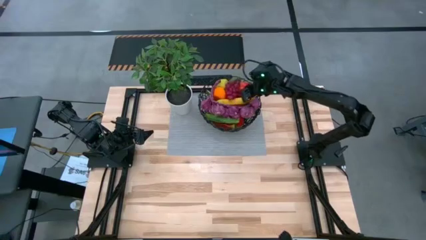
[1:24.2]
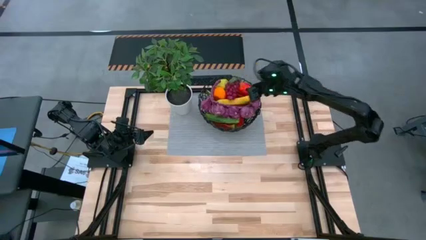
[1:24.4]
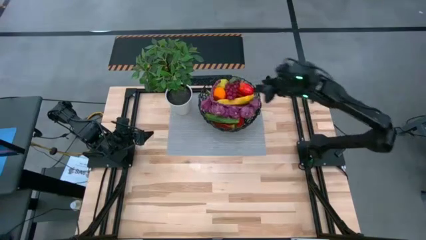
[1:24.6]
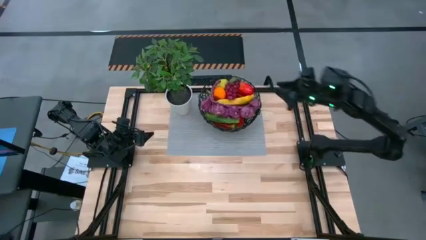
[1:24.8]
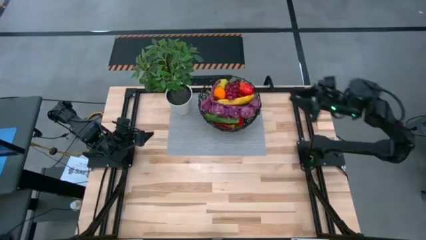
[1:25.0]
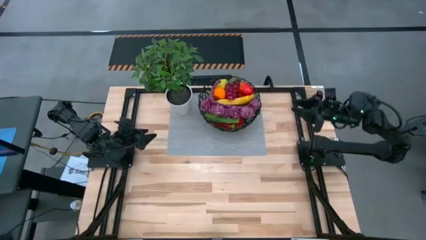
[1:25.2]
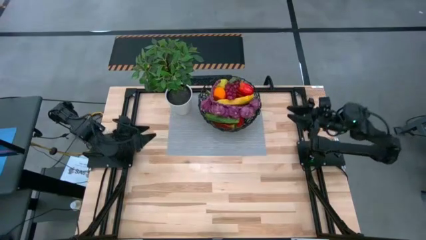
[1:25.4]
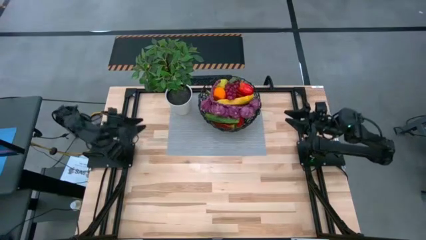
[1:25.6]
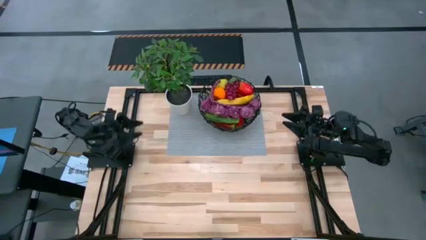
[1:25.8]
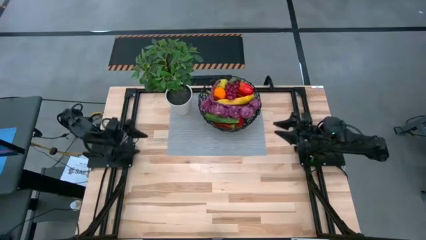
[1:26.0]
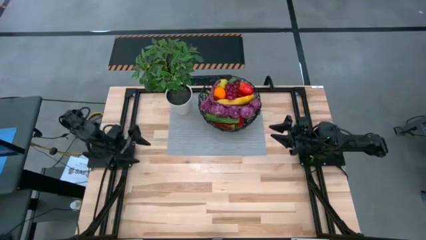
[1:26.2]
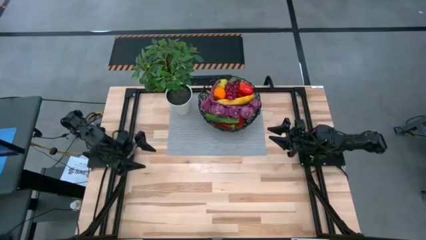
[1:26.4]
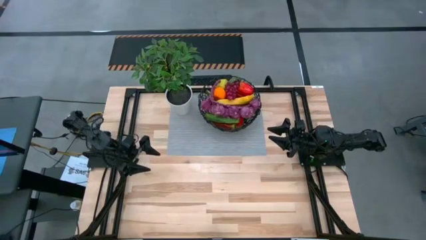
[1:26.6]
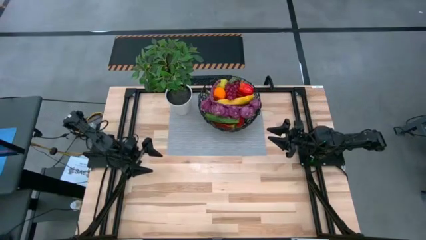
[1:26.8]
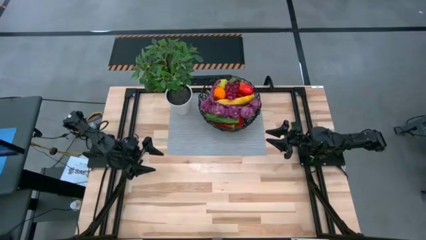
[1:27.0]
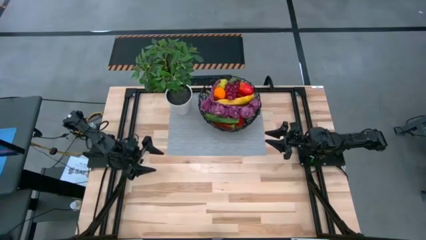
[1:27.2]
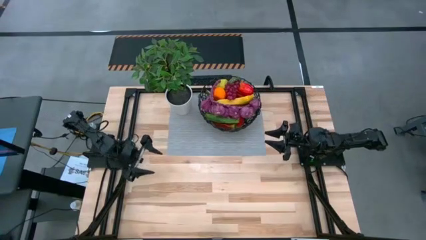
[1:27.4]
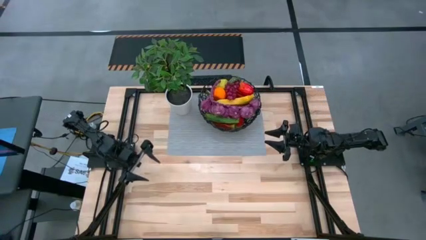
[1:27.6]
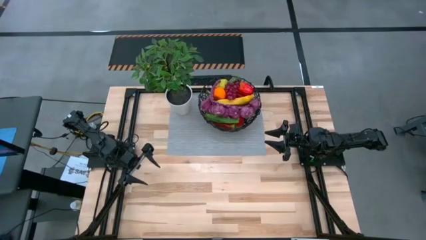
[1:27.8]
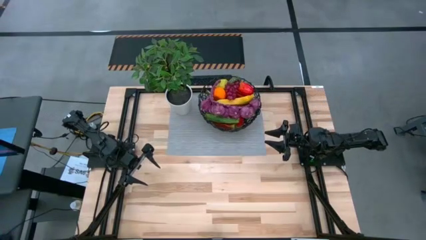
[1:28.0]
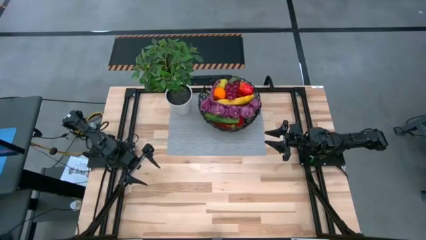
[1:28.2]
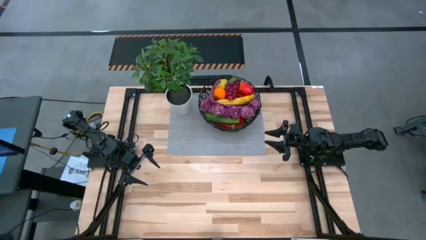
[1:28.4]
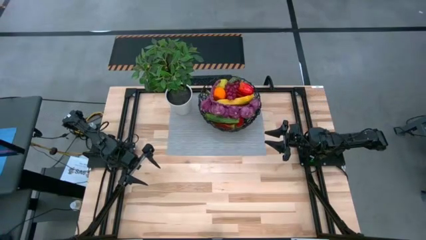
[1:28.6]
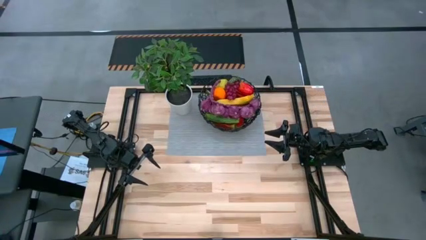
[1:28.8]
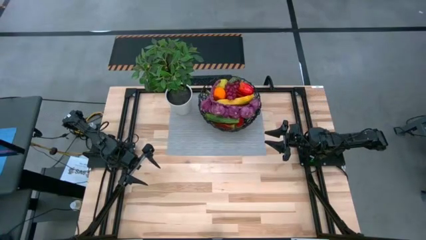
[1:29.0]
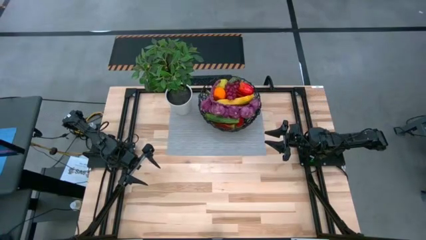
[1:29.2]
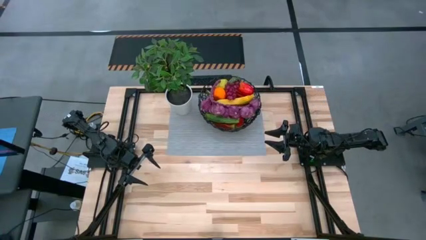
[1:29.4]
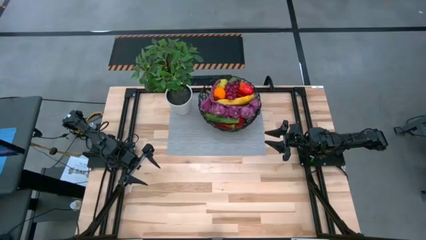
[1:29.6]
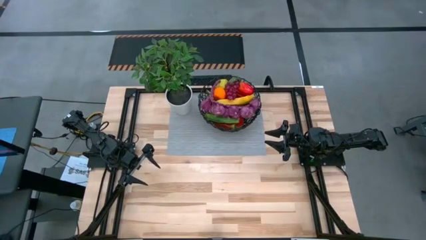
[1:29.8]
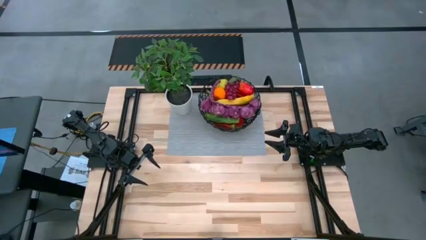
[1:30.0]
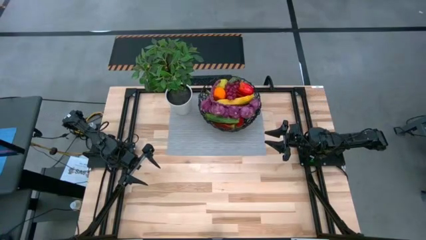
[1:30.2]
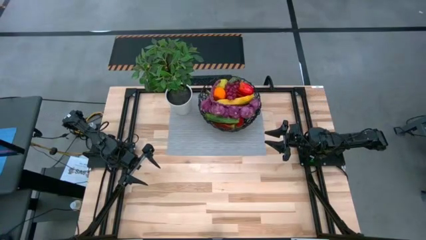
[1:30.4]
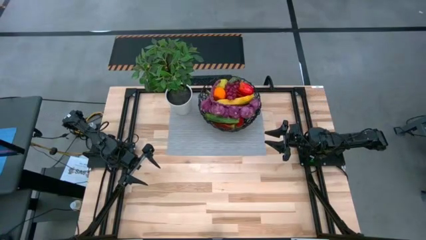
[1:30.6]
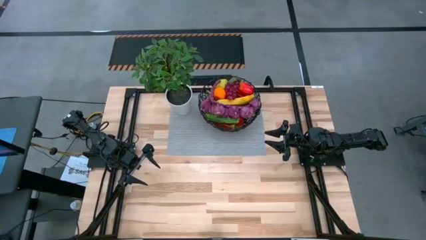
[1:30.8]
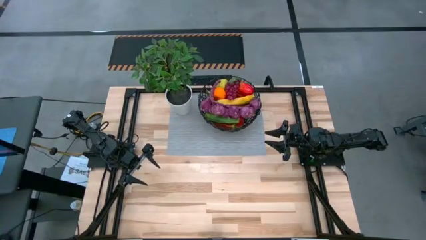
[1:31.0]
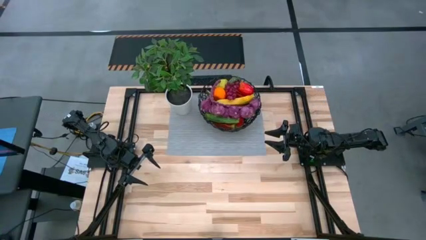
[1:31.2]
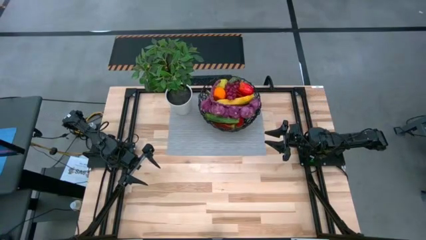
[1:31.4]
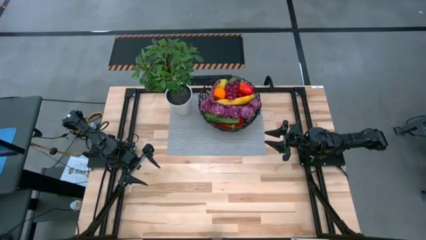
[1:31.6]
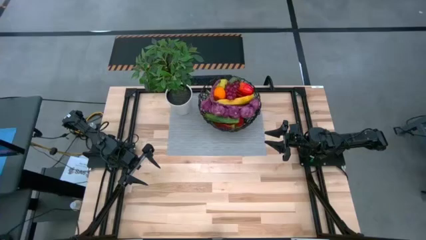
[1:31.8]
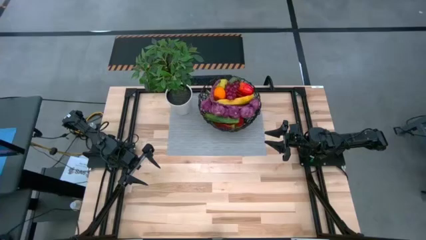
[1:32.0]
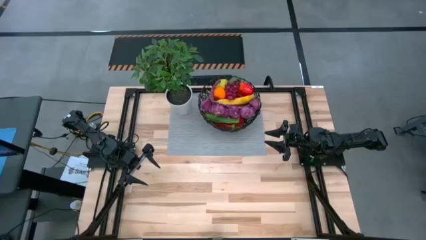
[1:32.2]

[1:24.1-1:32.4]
Task: Build produce basket
Return to Home Position

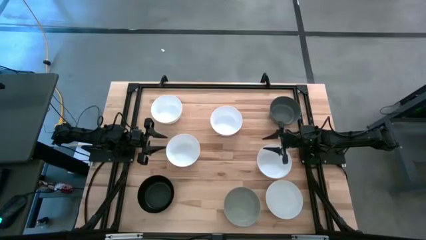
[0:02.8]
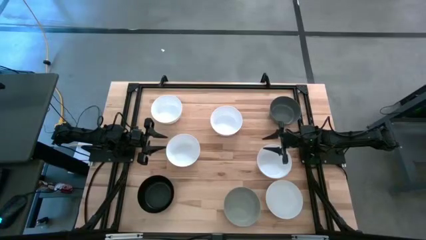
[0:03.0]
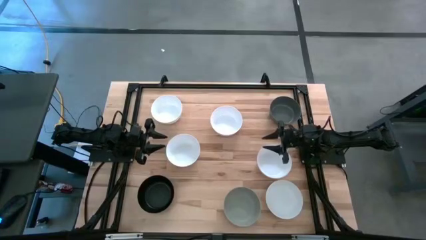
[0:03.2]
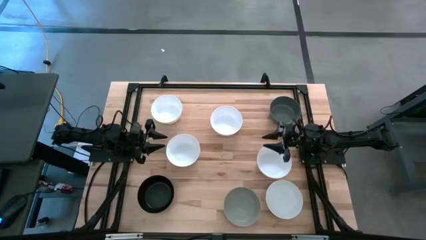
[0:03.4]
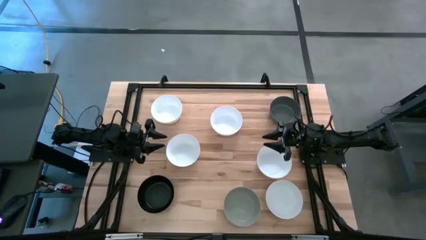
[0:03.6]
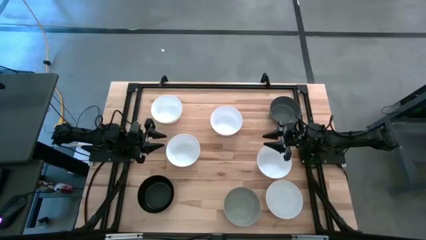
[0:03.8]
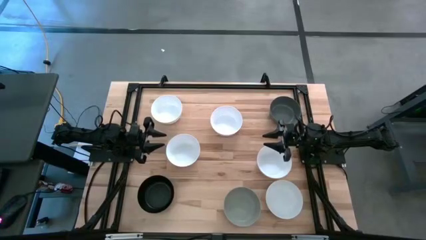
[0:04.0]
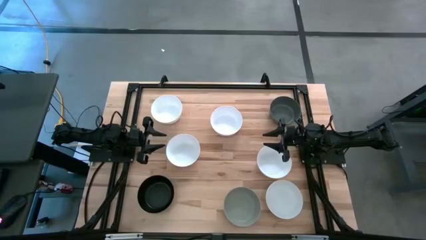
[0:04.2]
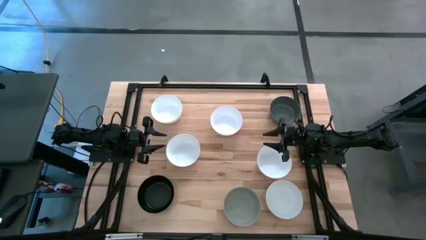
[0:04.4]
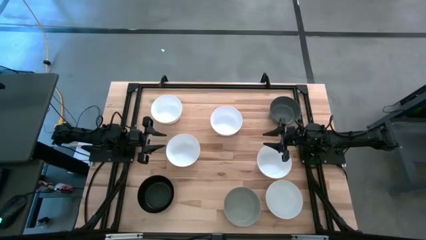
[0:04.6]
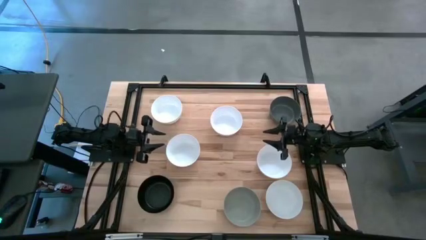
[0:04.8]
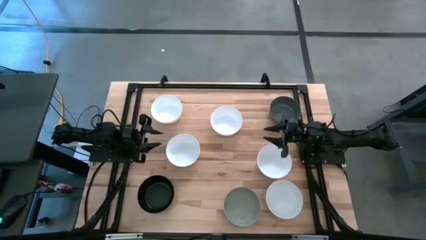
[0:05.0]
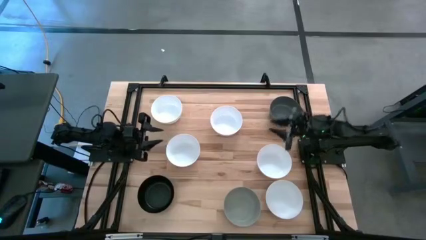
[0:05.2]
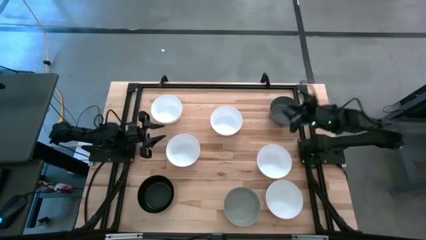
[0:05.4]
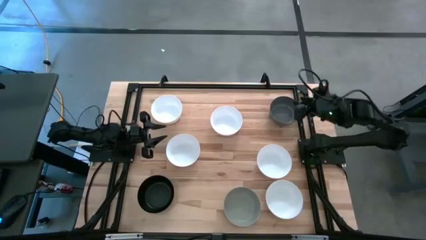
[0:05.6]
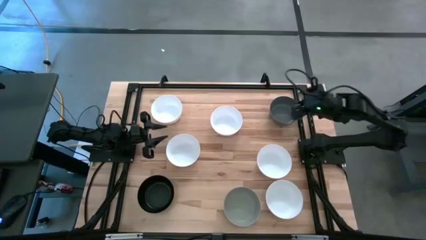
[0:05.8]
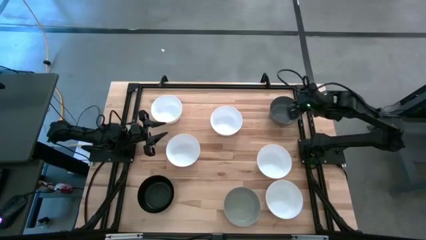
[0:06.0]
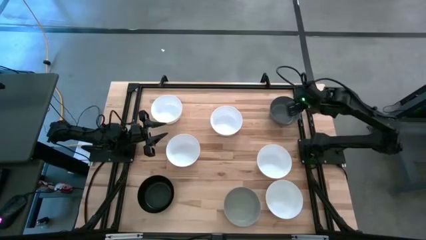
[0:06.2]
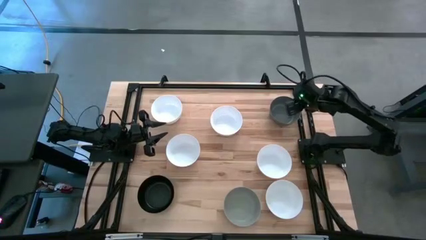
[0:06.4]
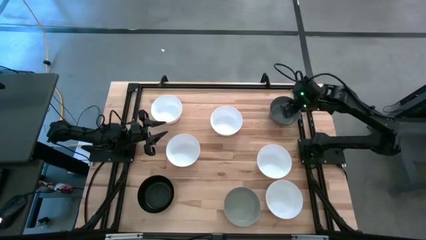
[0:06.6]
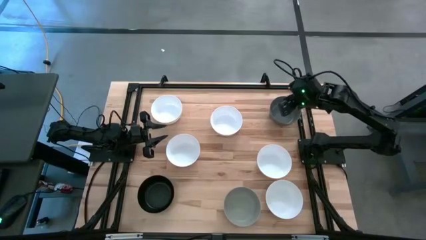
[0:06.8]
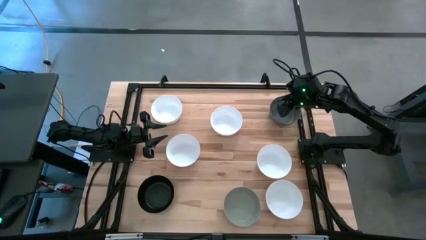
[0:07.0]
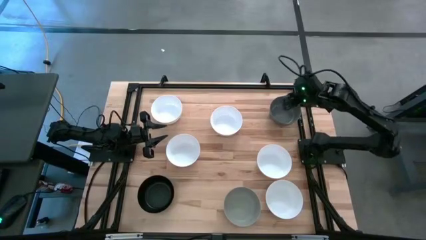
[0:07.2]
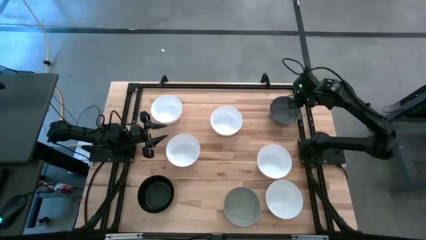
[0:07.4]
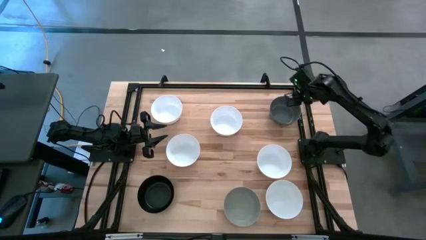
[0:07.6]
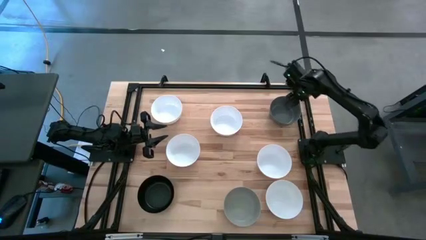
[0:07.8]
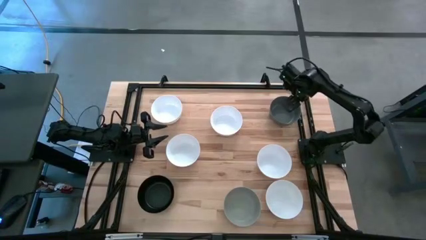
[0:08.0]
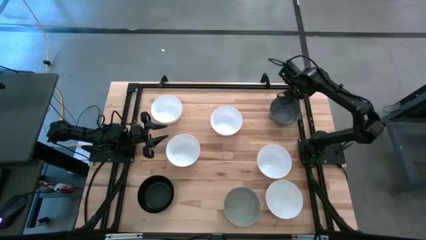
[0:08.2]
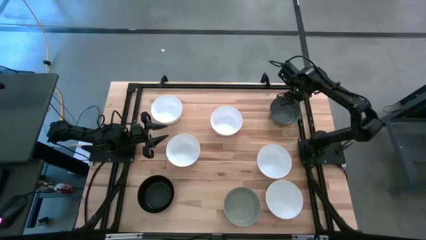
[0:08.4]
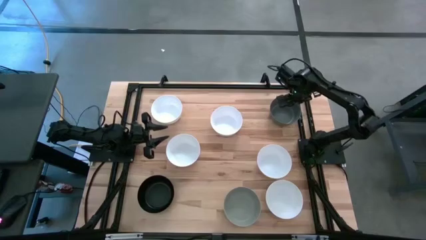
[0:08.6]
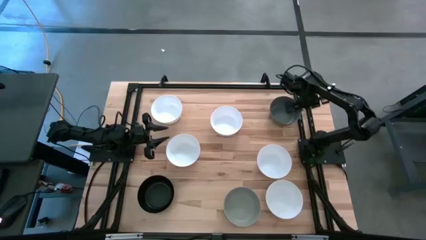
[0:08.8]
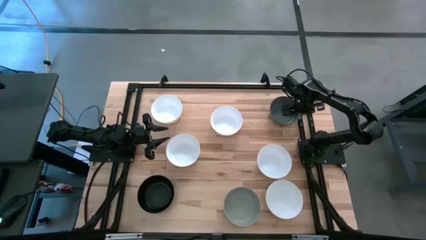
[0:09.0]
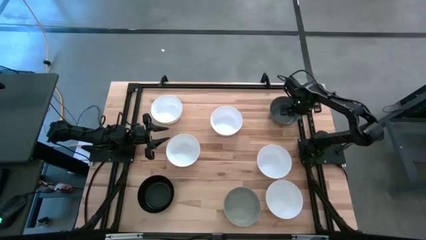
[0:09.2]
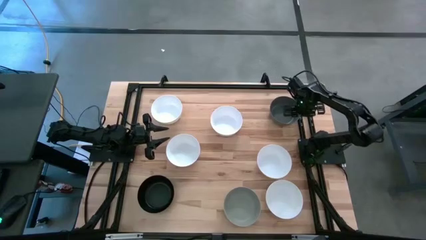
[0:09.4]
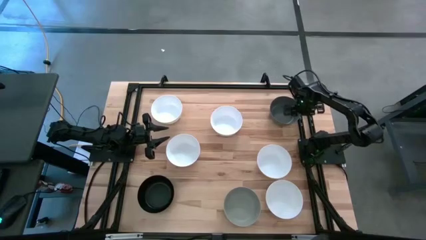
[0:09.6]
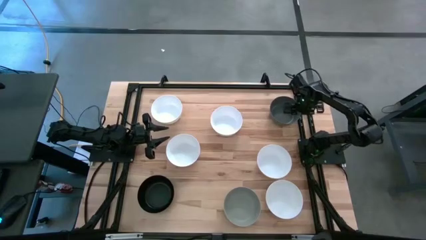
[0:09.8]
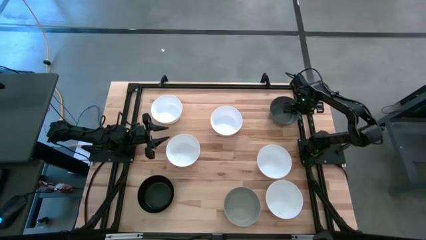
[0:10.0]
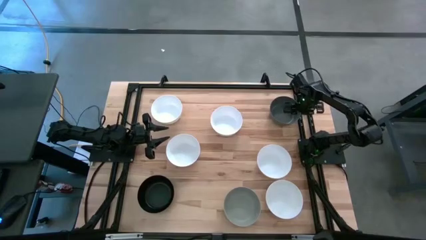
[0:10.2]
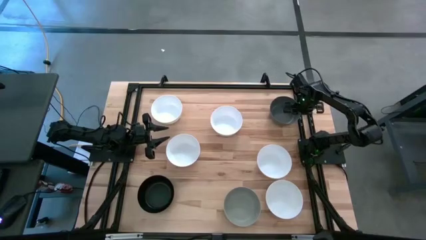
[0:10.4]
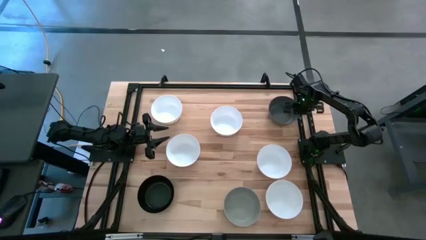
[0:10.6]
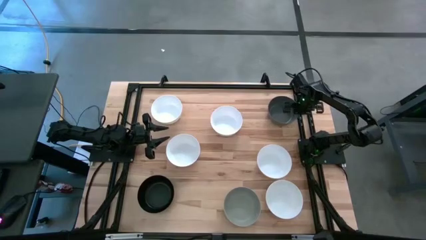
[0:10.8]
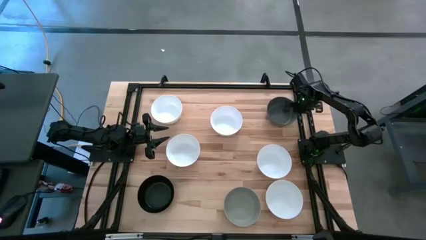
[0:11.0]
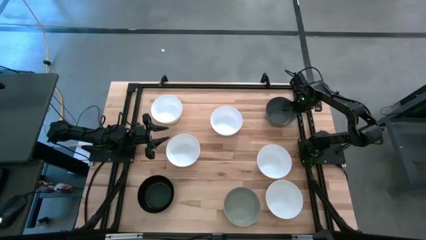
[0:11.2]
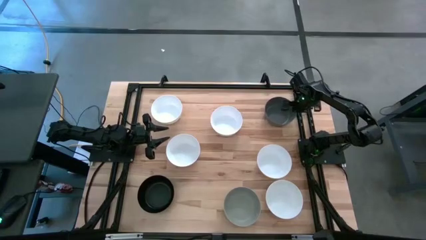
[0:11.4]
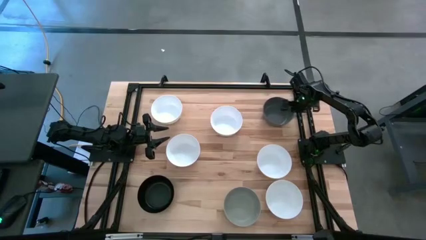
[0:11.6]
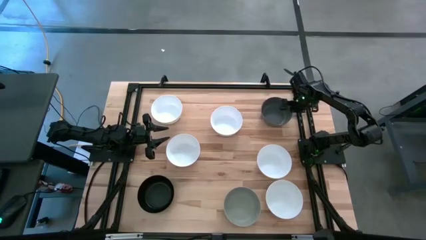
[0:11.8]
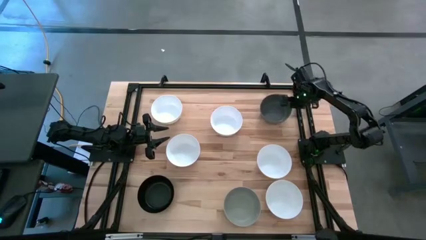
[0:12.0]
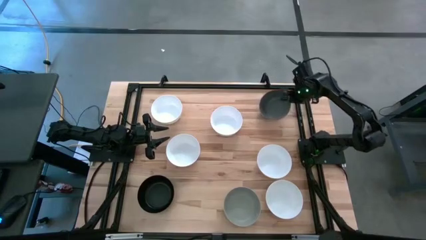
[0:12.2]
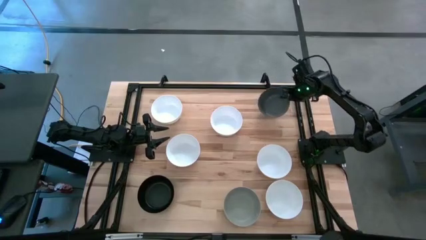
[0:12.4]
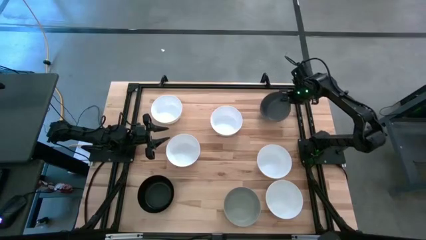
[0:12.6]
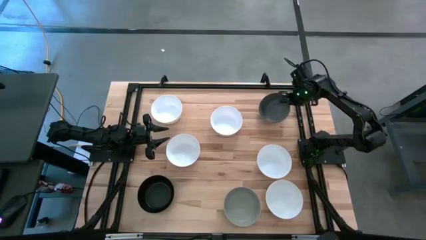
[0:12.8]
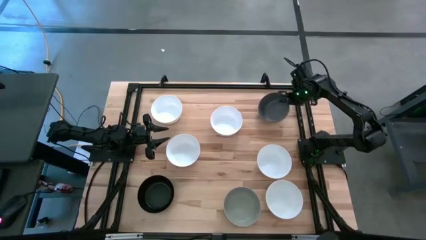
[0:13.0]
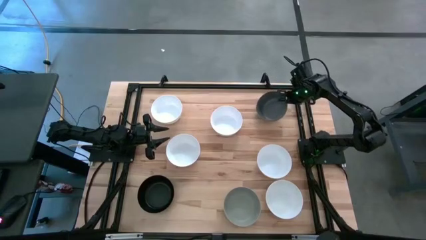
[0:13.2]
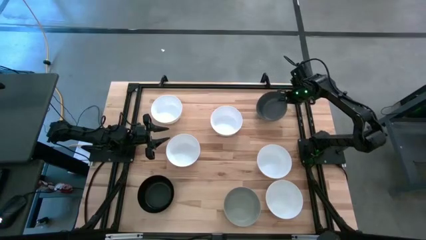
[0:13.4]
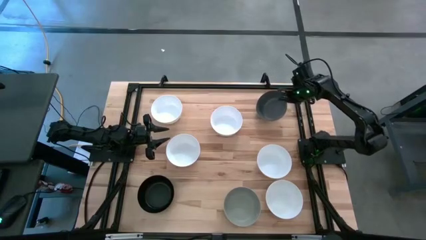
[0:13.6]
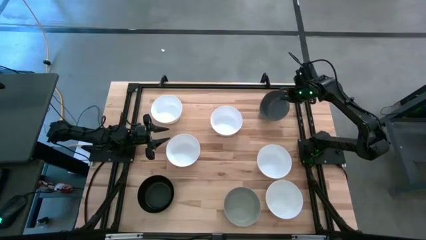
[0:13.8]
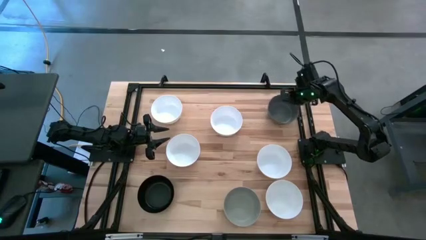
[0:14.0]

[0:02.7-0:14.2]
Task: Nest bowls inside each other
Stack the gray bowl on top of the white bowl
